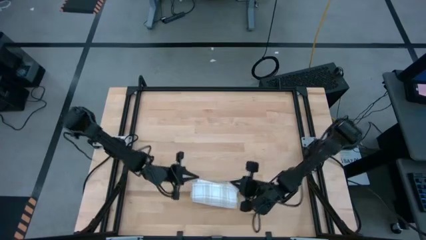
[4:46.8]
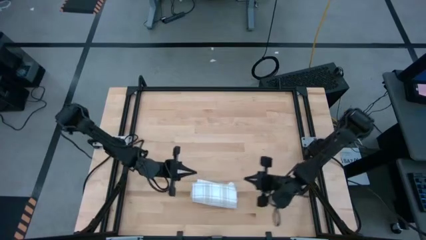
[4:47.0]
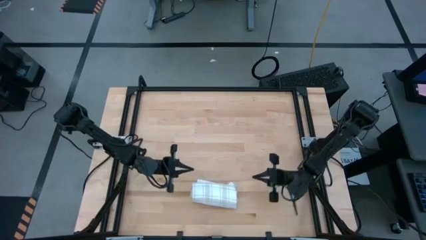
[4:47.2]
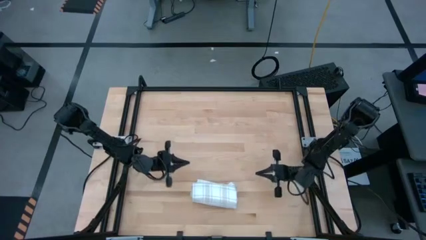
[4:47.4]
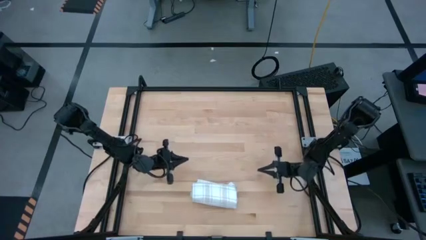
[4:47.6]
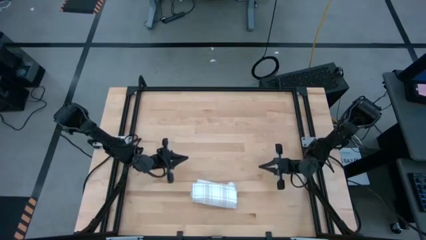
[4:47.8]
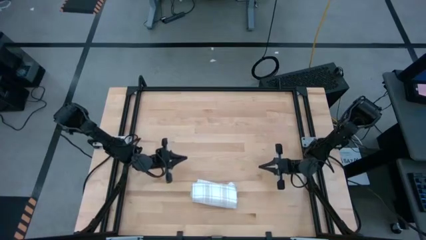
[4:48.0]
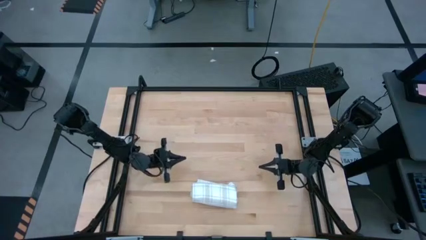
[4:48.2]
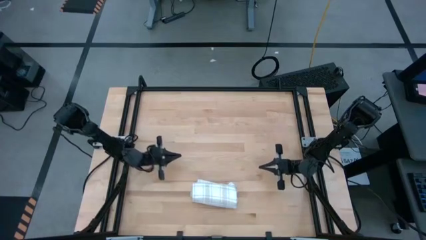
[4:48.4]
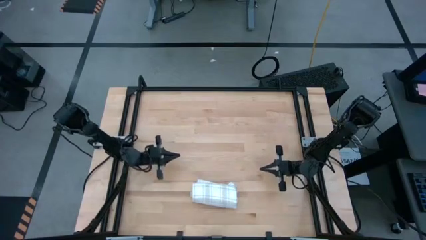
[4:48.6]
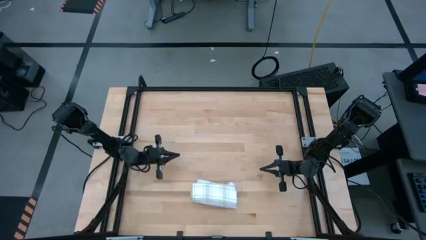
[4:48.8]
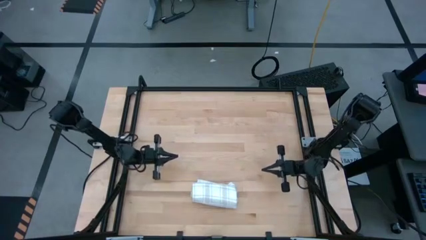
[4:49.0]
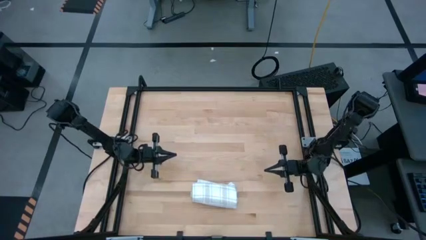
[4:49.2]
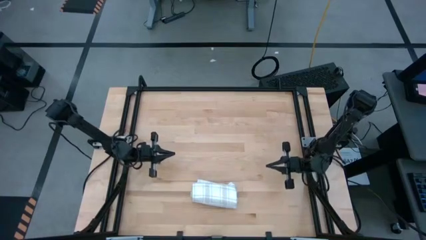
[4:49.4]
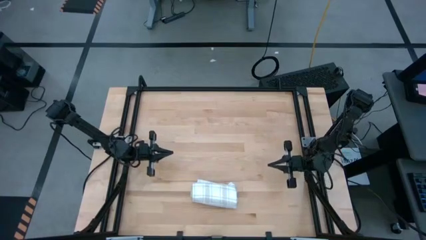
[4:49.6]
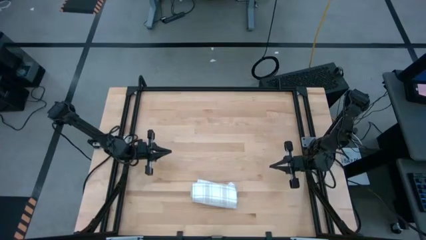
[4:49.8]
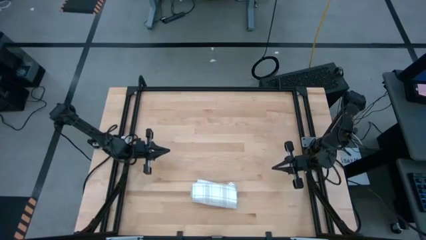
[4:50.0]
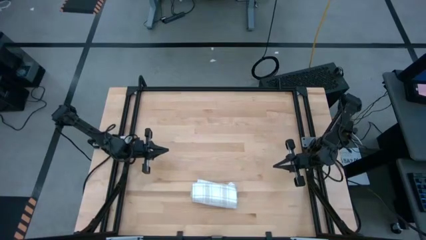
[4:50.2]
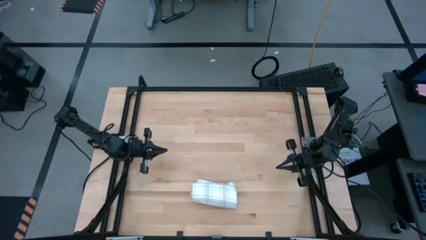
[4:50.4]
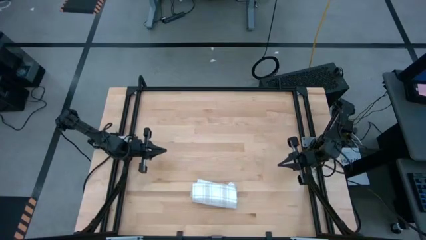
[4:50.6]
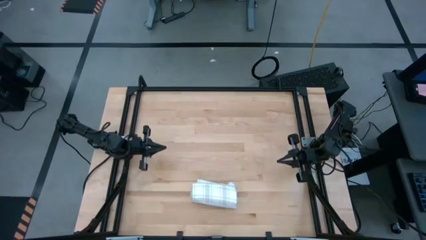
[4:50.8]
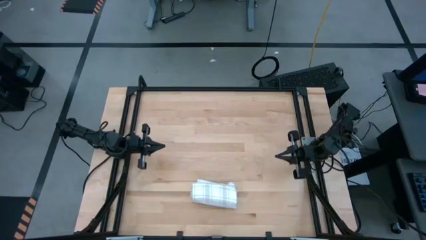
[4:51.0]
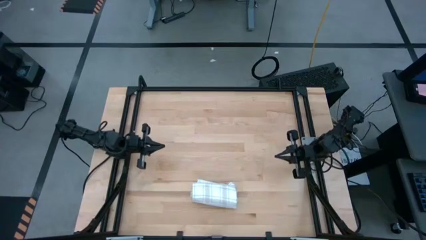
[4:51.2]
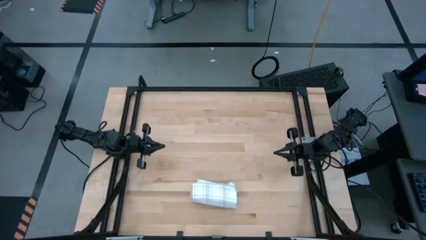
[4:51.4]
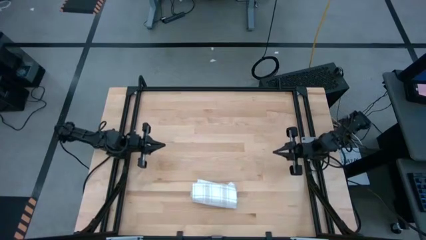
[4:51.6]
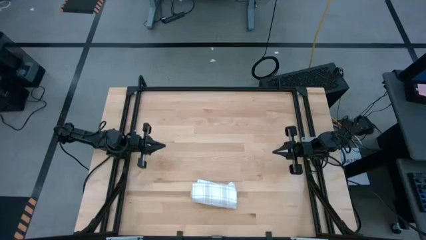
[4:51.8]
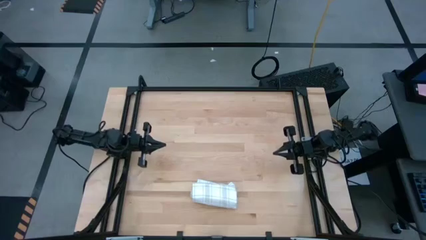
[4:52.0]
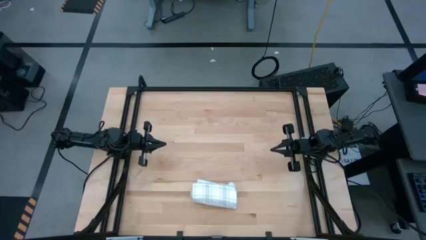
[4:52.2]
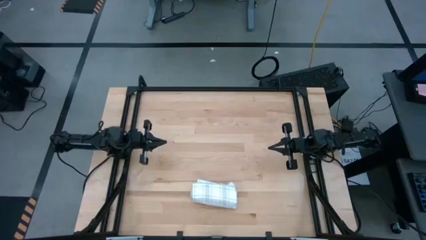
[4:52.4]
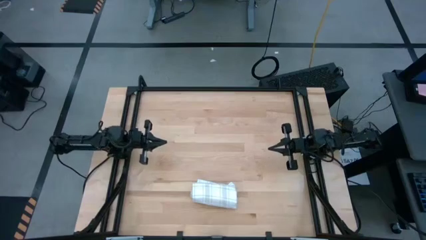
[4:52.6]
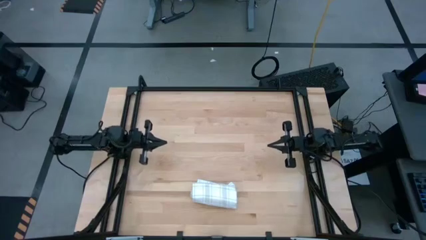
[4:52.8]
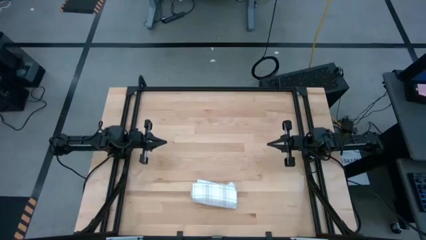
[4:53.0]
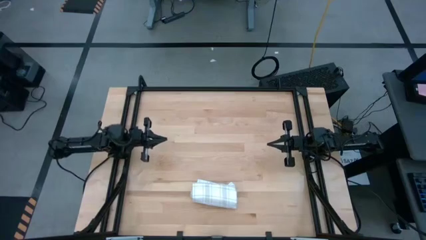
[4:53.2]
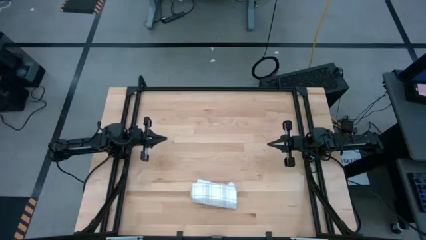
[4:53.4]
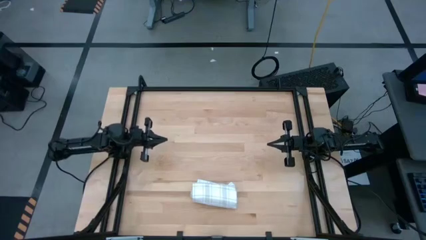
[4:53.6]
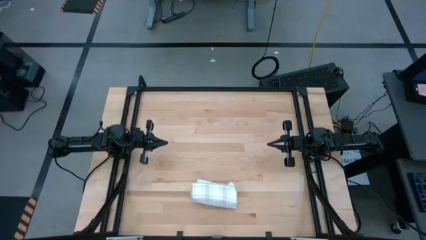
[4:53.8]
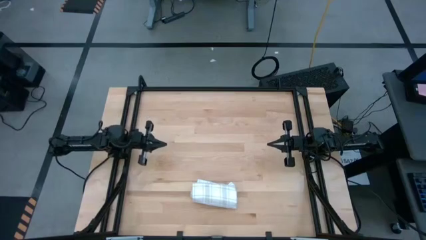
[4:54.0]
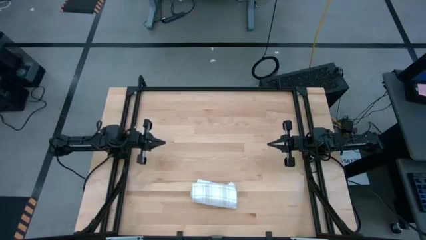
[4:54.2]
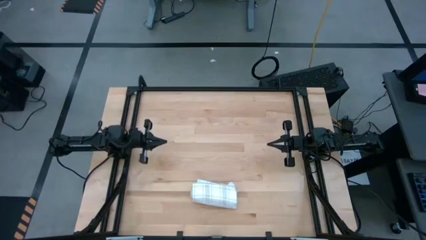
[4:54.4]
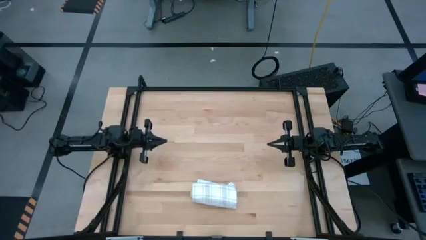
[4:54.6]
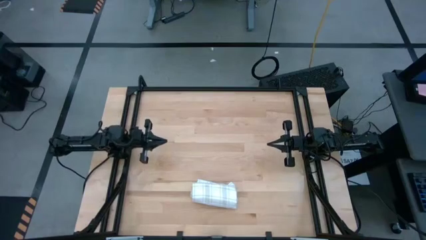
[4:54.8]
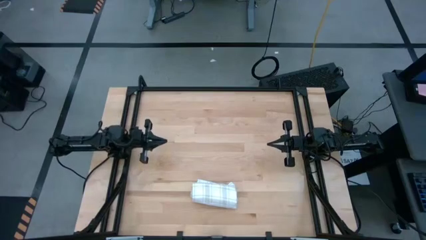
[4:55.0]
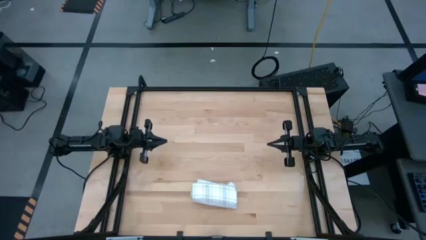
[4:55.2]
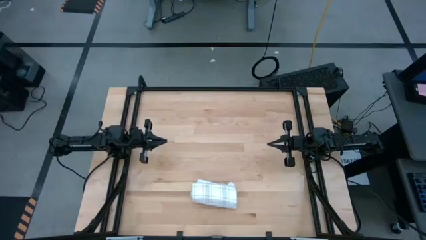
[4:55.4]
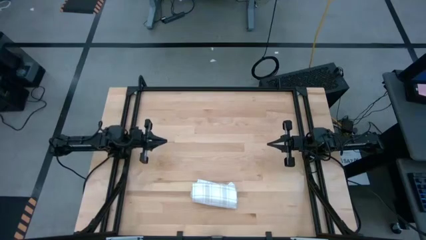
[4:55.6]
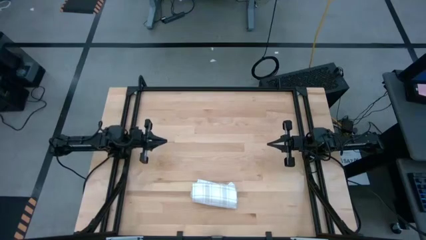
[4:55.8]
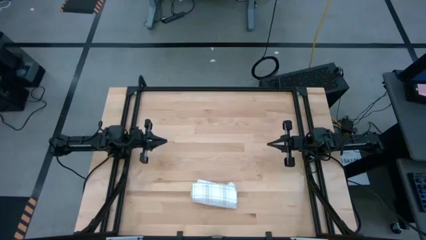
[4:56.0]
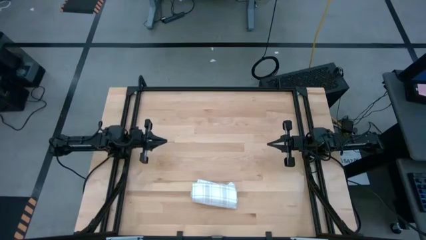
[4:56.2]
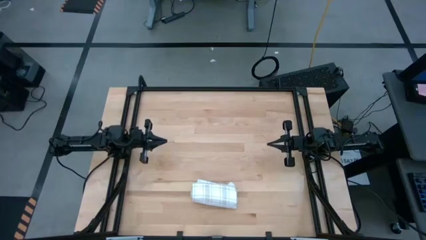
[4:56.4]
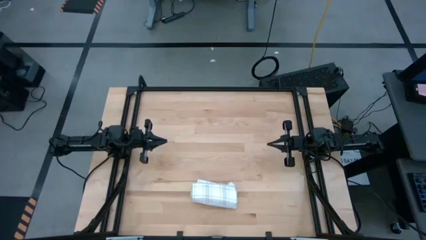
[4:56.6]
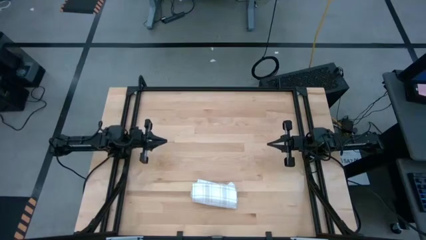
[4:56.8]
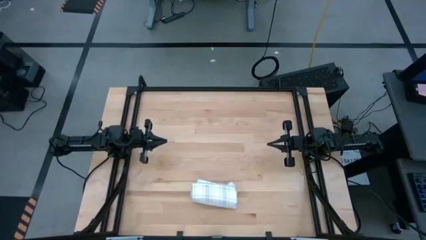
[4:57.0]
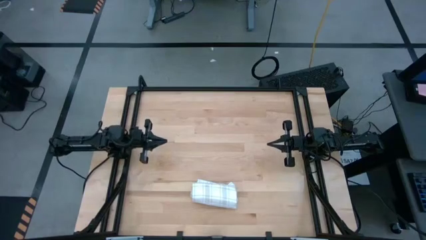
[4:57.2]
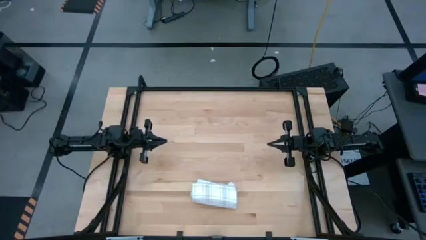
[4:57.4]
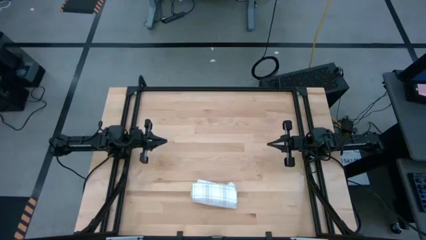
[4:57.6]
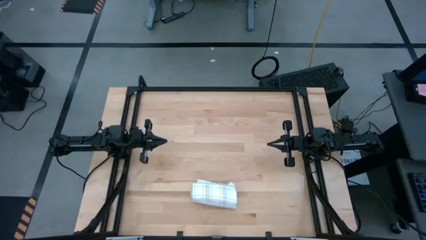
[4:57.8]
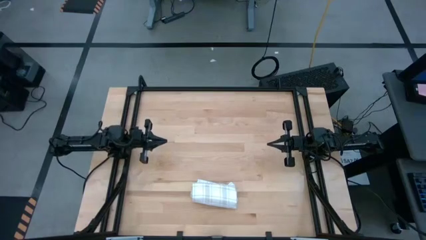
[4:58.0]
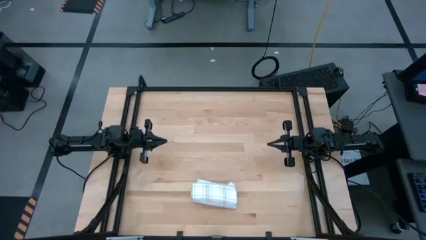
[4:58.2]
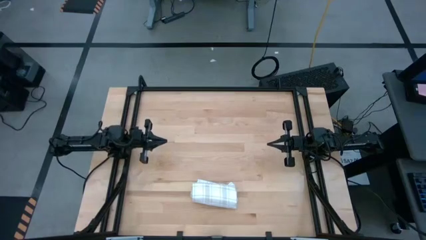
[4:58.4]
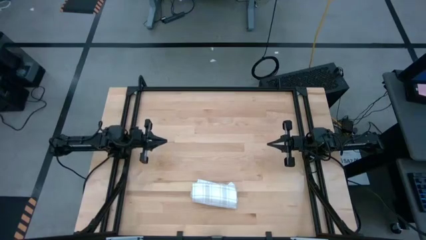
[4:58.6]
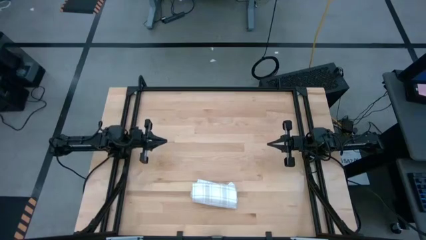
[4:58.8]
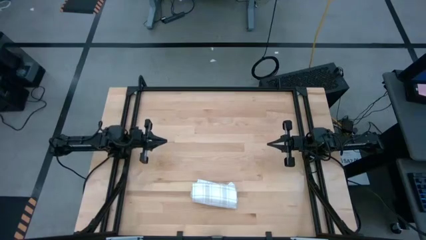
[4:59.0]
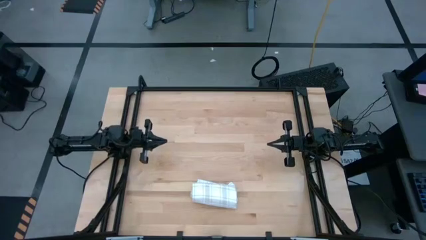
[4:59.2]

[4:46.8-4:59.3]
Task: Roll towel
Return to home position

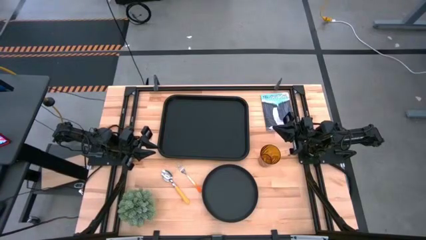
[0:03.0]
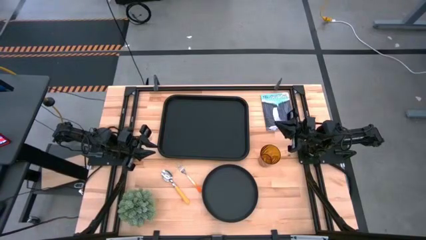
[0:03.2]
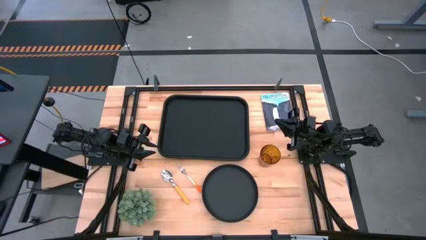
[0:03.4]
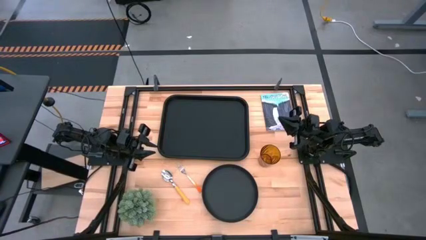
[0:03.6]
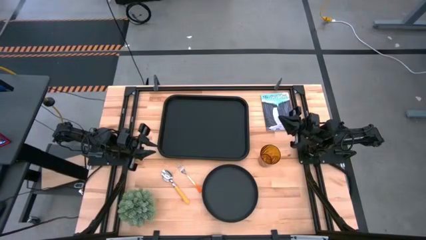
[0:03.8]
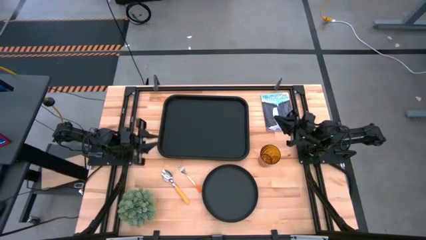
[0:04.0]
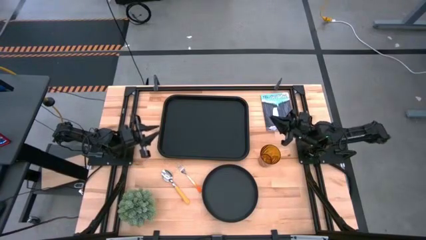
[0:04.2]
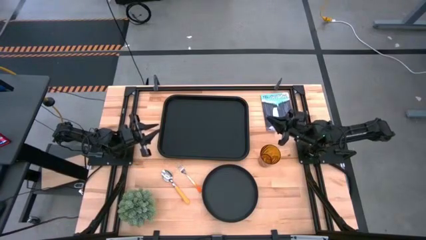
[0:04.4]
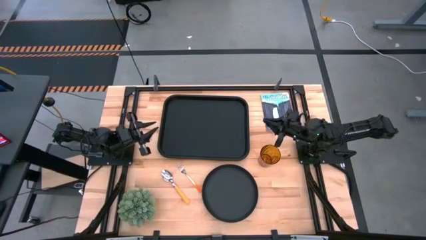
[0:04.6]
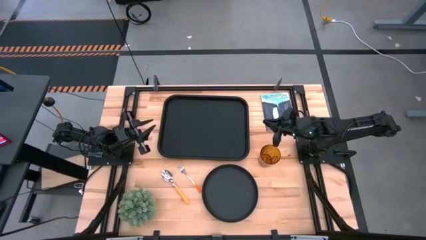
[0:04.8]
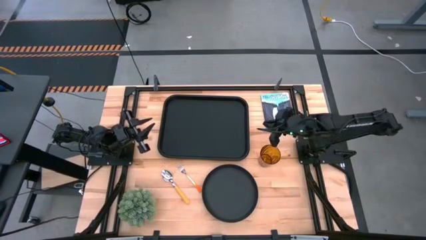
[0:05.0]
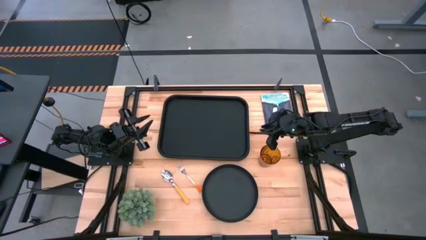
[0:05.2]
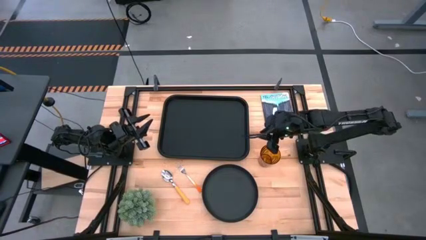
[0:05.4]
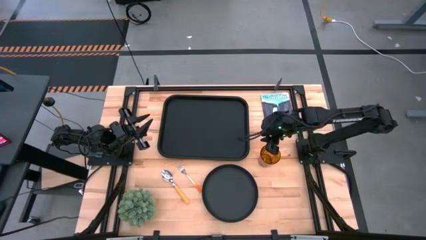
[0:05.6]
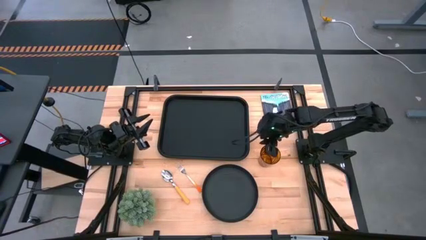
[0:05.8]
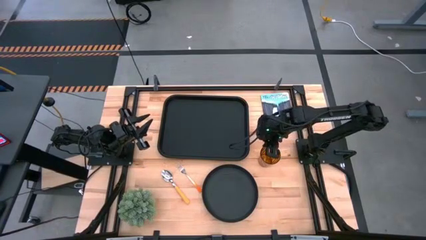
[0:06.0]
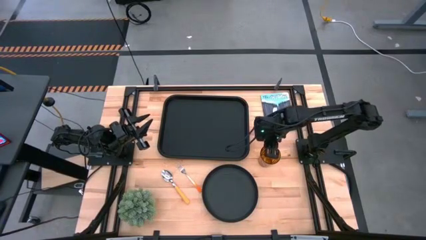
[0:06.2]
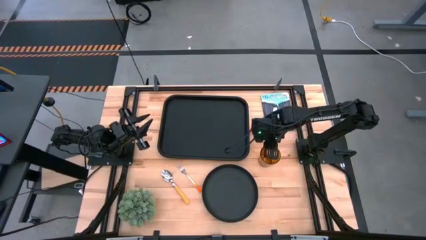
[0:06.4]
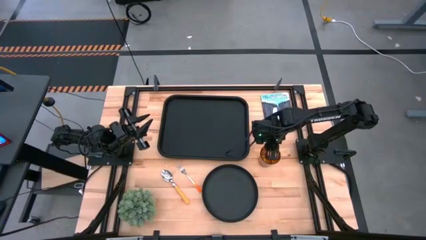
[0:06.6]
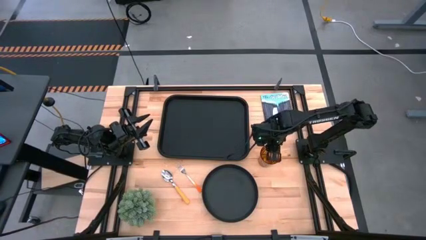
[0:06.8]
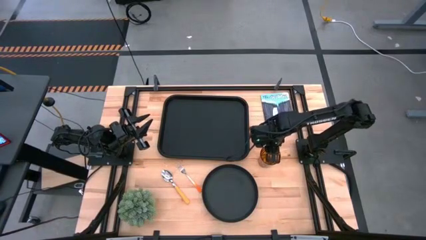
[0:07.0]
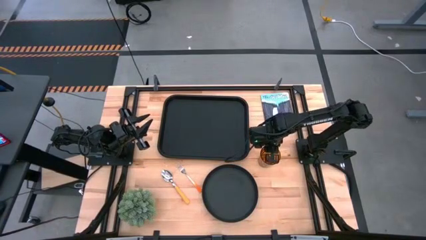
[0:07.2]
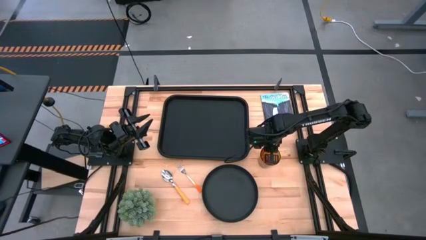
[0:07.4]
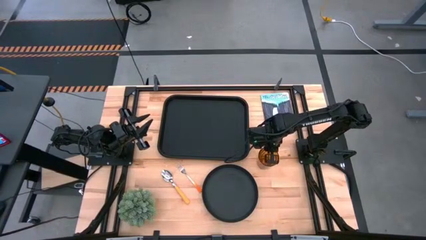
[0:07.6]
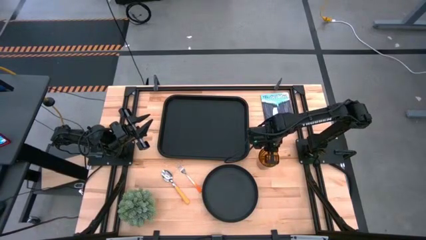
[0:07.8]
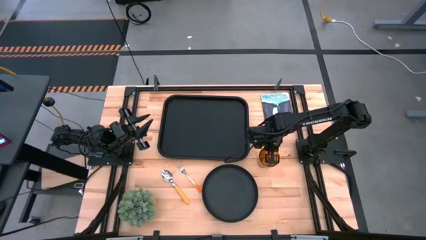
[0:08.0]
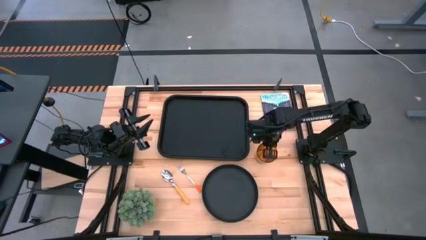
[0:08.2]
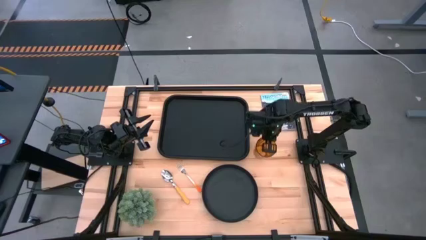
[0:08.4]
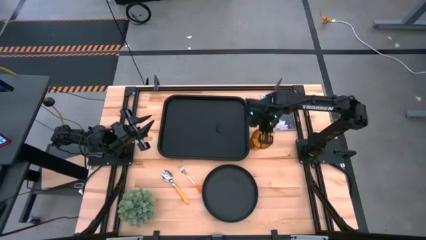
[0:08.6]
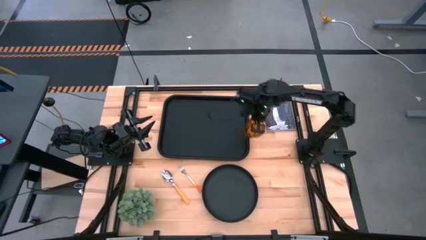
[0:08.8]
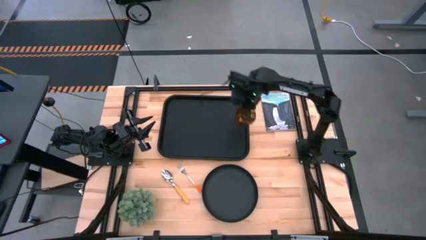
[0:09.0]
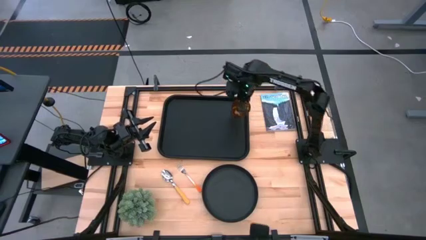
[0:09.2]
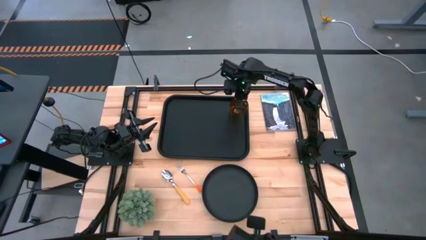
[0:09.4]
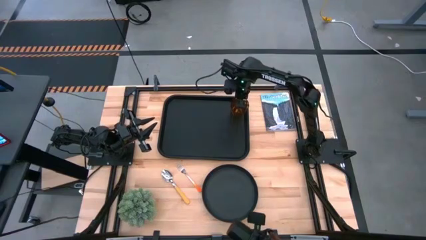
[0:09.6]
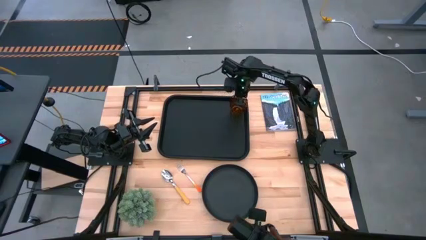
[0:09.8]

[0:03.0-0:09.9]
Task: Pick and place plate/cup/fork/spoon on tray
Put the brown cup on the black tray
